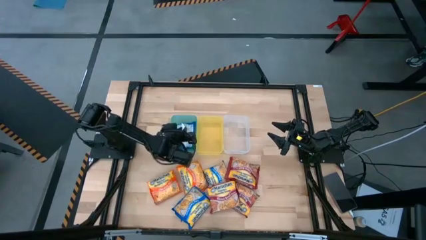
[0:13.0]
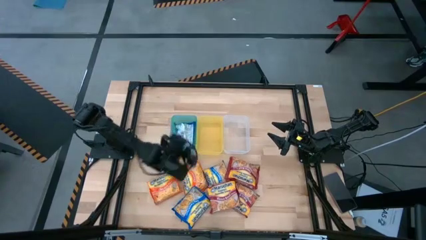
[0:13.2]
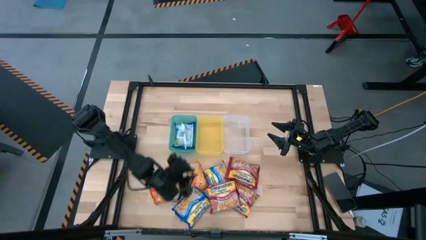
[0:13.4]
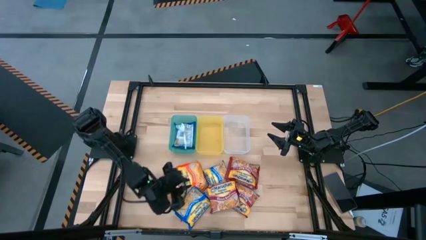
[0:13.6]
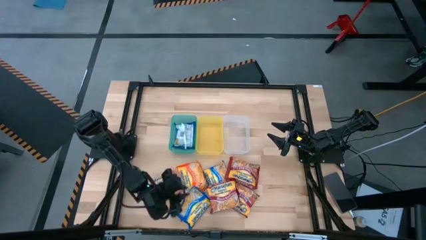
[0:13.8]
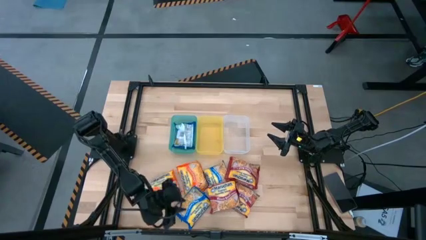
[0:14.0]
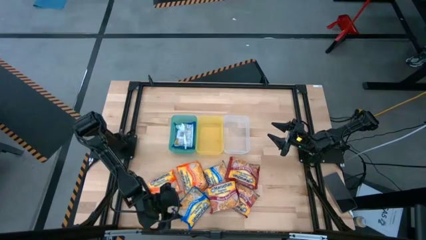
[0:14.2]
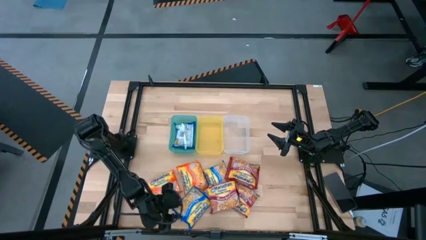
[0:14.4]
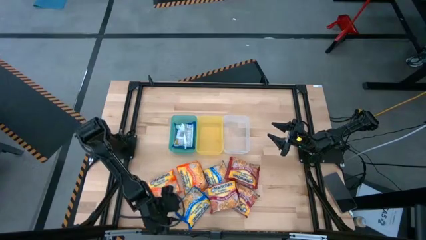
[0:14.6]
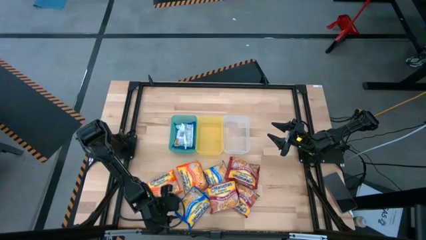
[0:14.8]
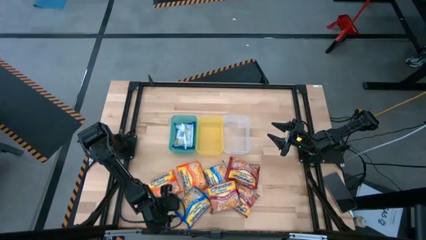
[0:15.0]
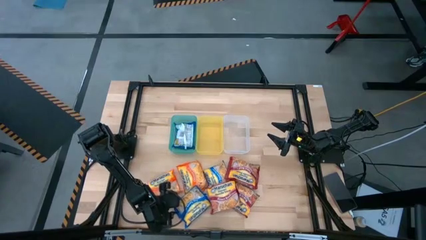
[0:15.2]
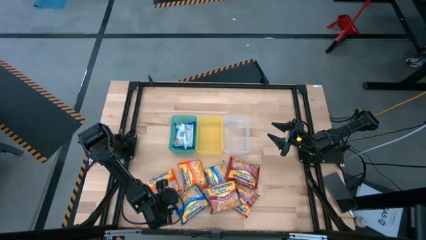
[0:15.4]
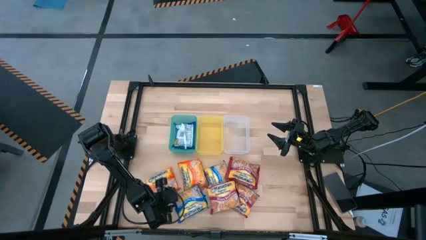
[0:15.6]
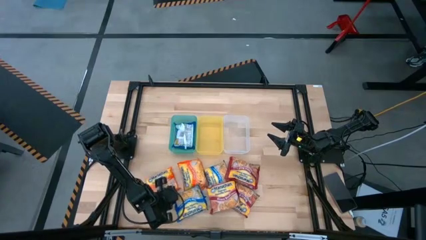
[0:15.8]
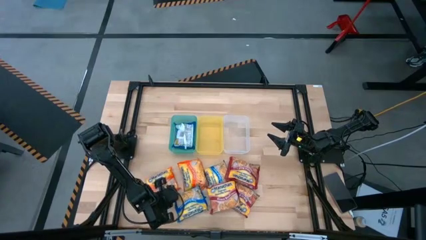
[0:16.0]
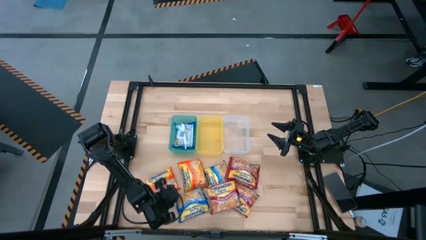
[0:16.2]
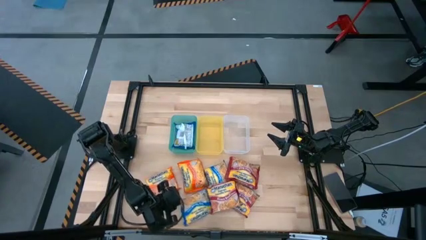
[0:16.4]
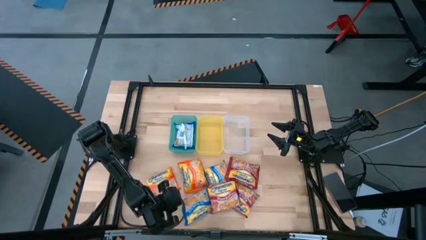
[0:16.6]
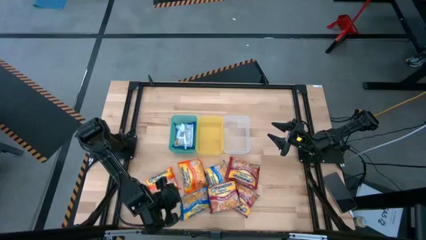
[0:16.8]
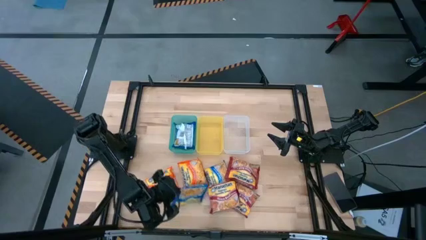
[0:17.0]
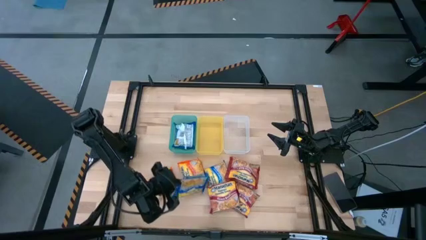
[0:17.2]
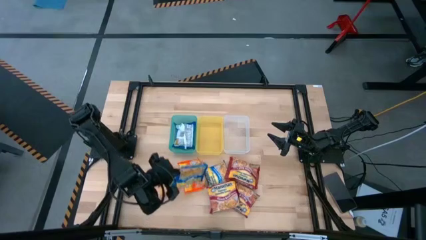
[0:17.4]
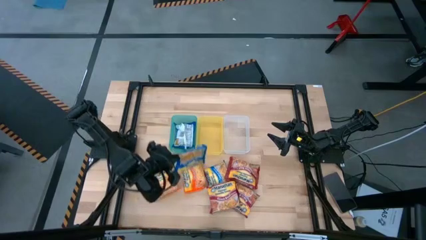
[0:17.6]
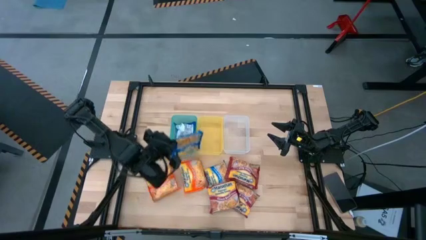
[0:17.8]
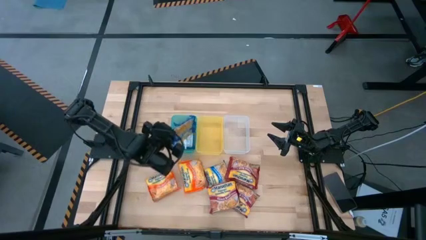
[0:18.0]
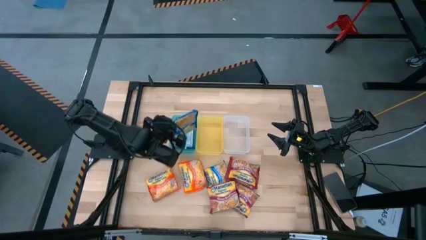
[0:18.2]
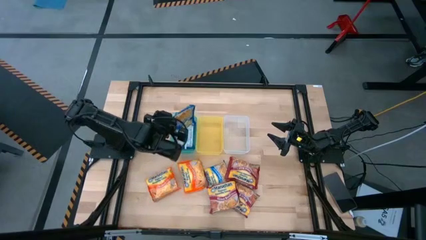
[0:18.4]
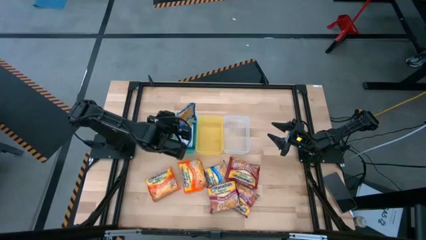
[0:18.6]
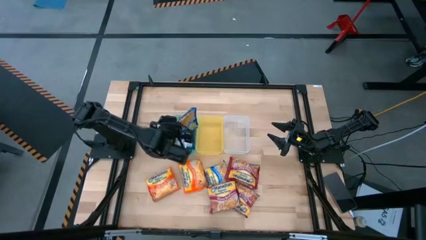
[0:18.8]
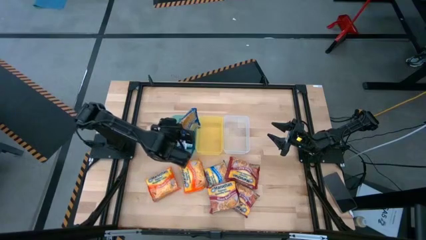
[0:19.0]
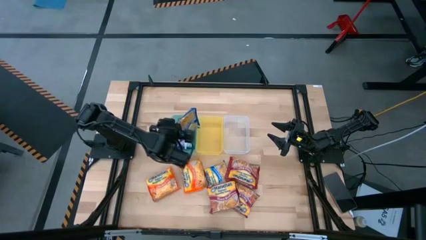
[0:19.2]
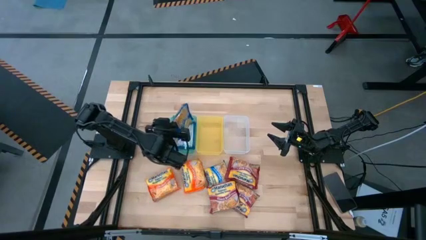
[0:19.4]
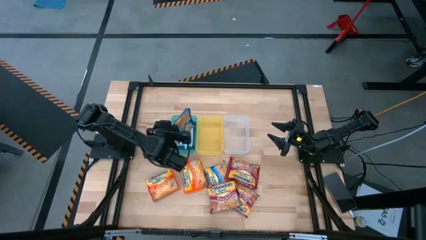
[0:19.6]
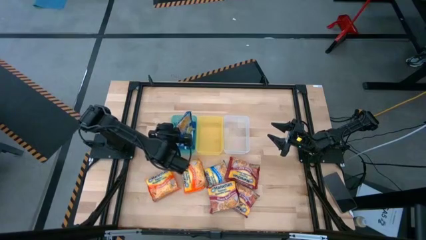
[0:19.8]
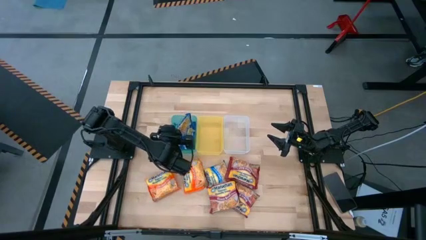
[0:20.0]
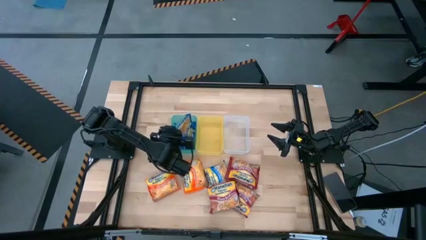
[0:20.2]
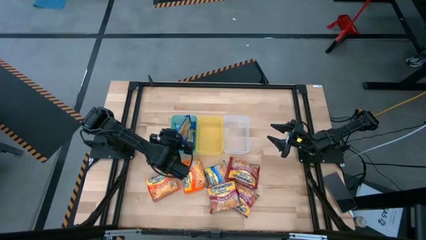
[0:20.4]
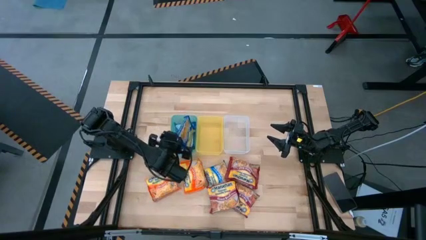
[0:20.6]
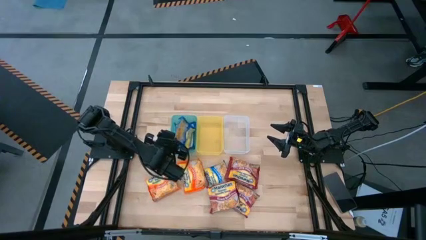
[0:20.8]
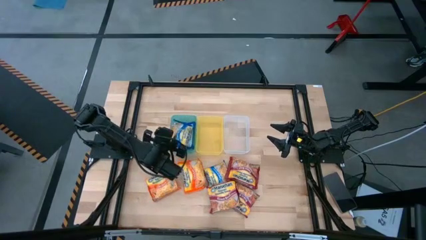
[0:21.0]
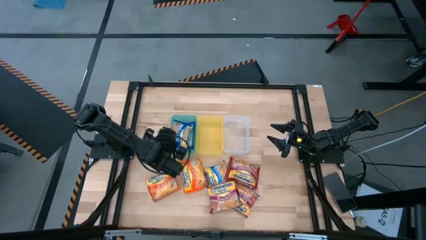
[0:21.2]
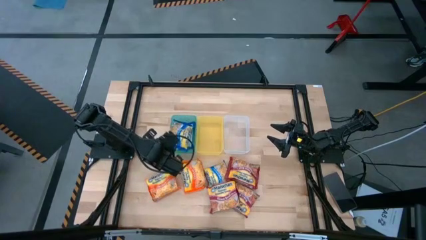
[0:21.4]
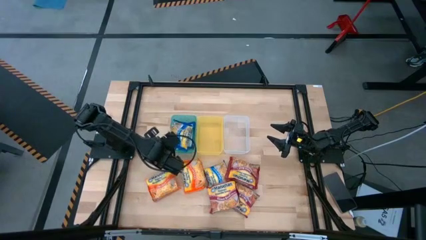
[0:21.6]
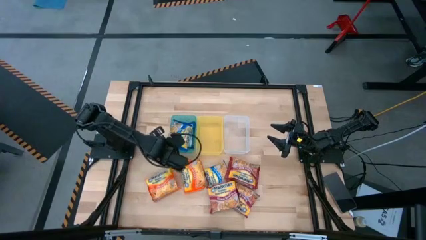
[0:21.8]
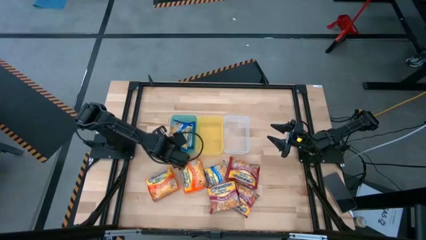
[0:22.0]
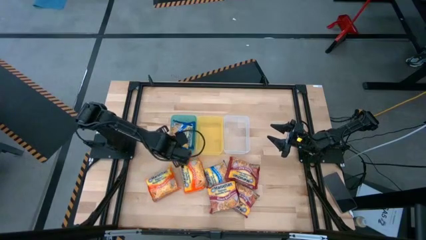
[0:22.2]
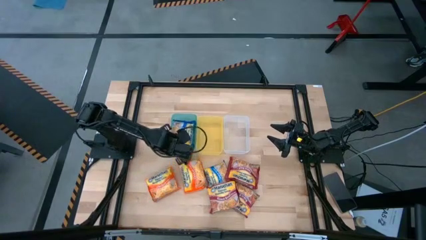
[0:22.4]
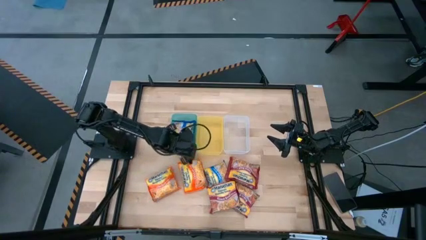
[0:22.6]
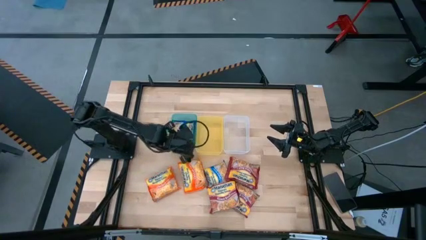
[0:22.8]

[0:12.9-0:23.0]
Task: Sort Maruchan noodles
Put the blue bag into the green bin

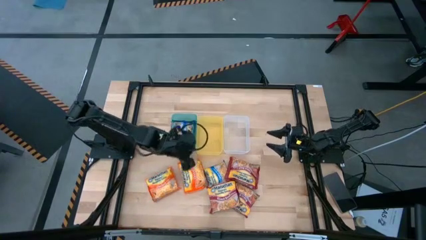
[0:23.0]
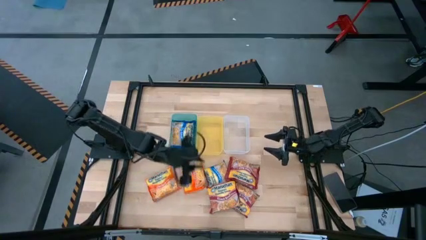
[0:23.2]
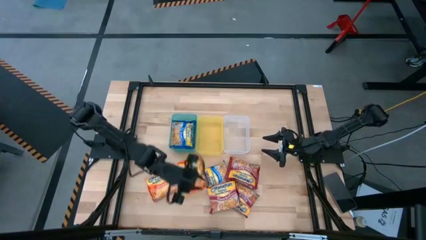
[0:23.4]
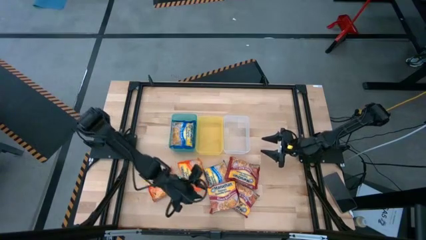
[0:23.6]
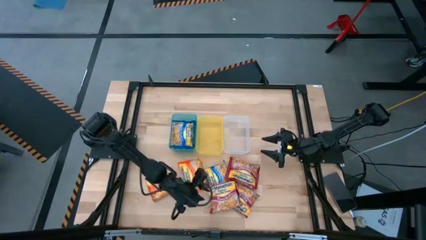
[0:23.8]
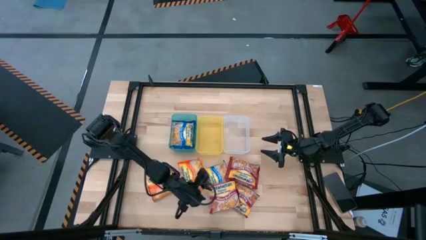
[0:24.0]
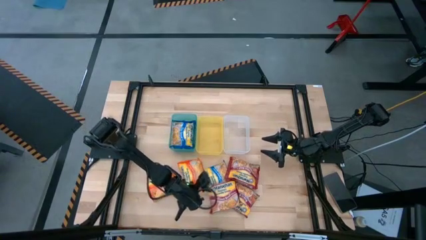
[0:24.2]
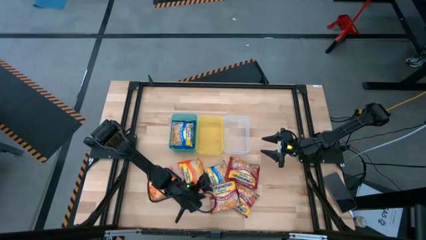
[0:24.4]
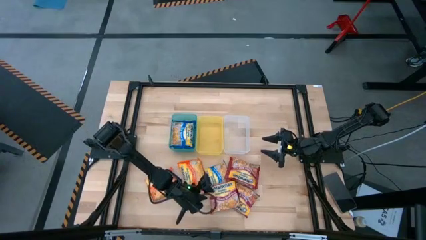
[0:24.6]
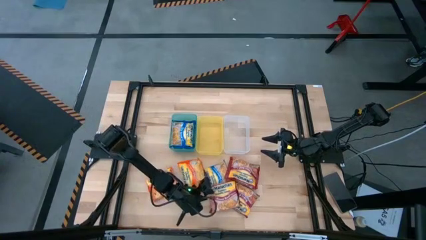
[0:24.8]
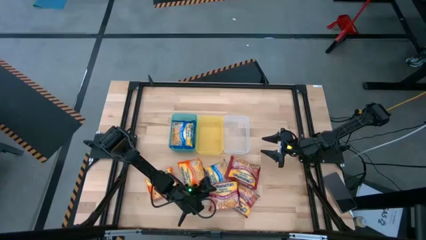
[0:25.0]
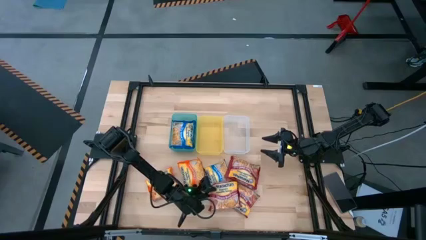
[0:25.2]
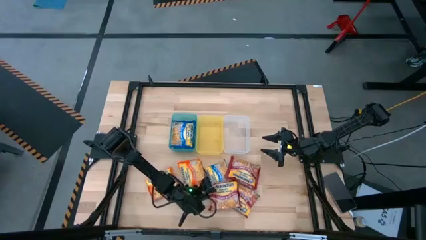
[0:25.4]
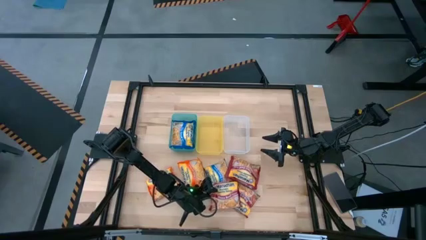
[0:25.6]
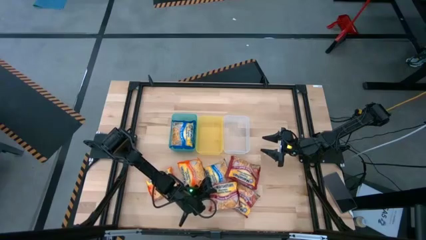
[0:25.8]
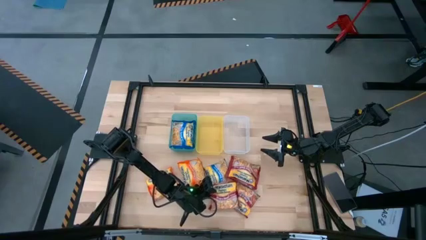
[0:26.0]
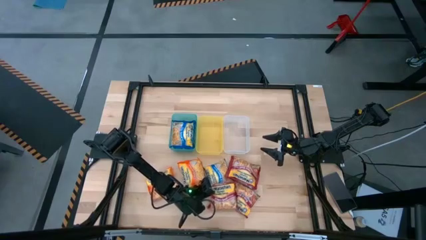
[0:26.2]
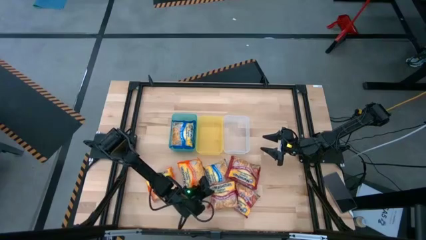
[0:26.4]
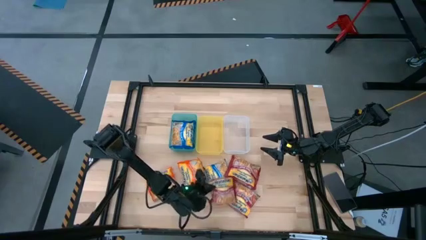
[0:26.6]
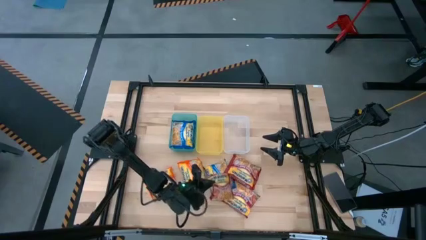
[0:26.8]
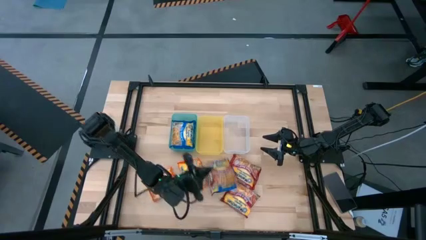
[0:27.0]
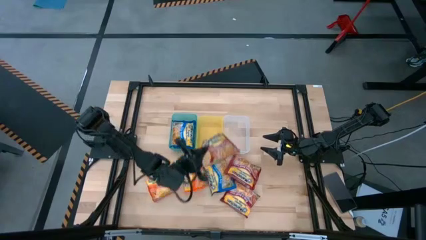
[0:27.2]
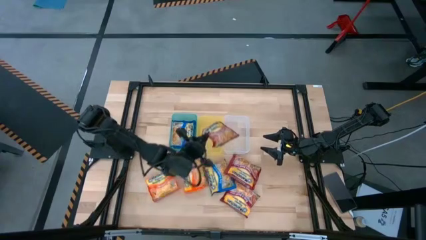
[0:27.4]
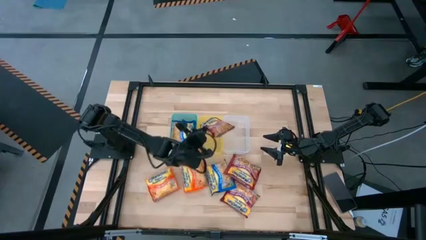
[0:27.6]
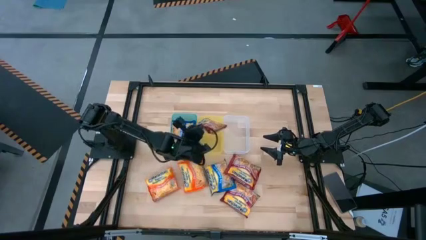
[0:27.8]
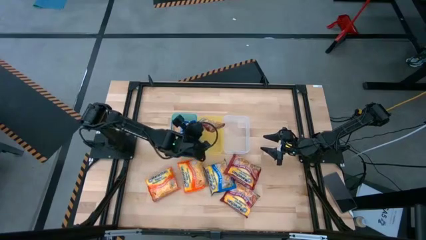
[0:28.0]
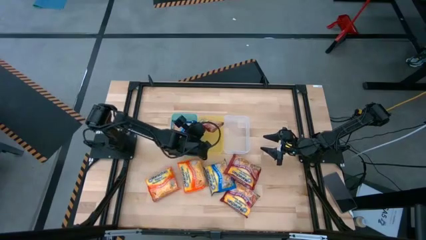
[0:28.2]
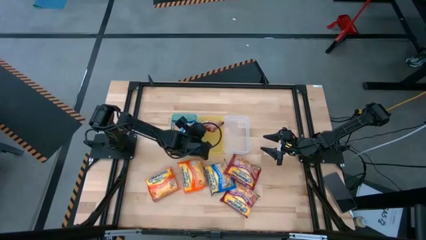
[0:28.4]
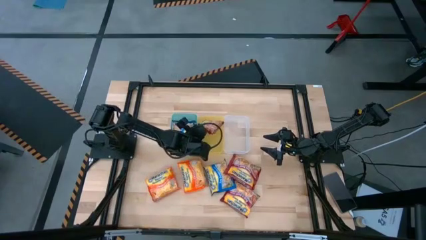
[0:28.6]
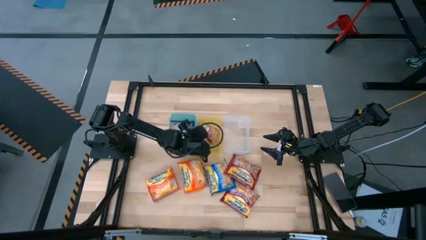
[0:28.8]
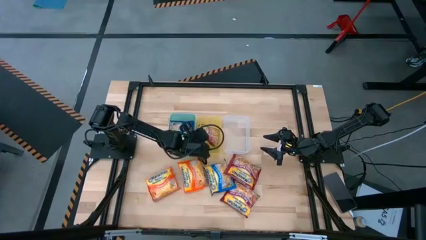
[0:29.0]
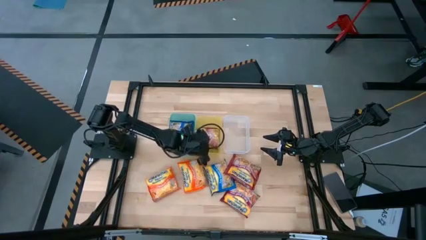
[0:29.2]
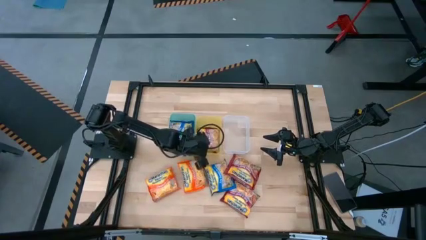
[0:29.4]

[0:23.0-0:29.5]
Put the red bag into the yellow bin
